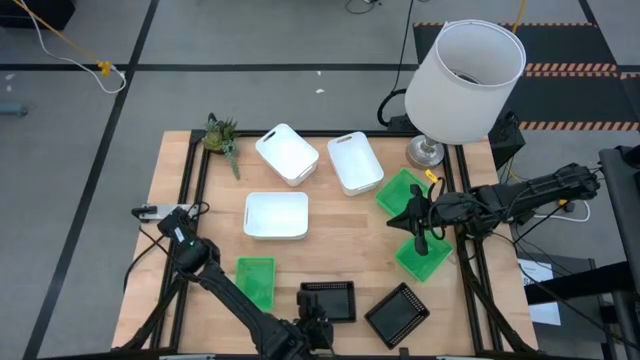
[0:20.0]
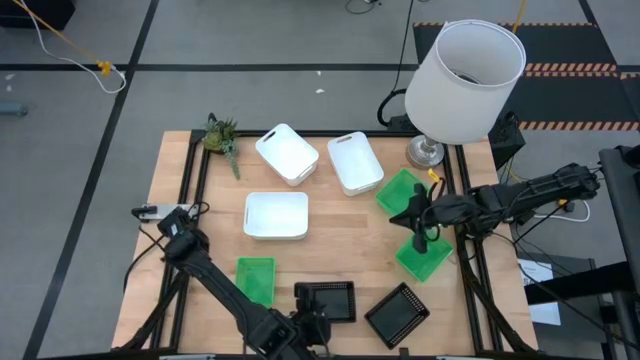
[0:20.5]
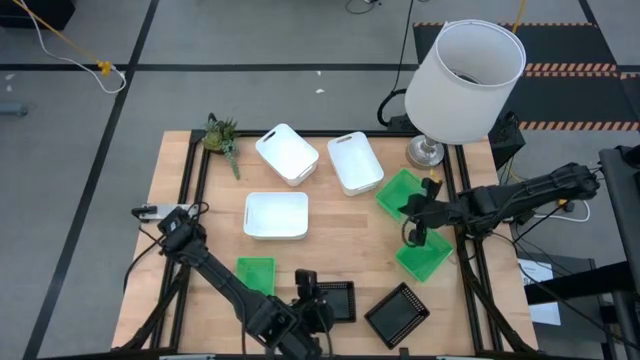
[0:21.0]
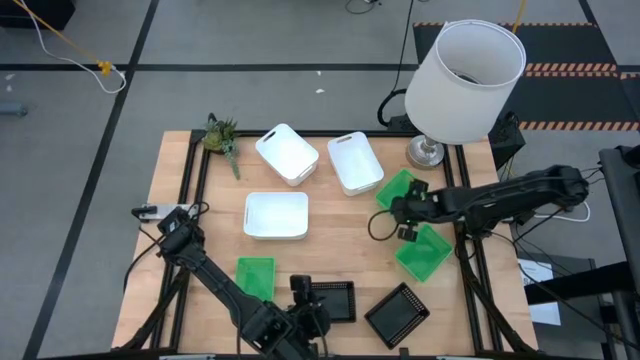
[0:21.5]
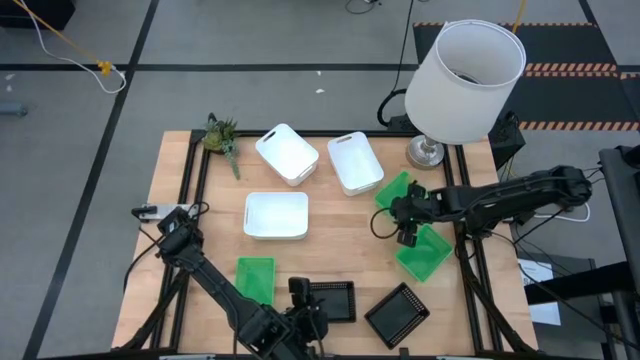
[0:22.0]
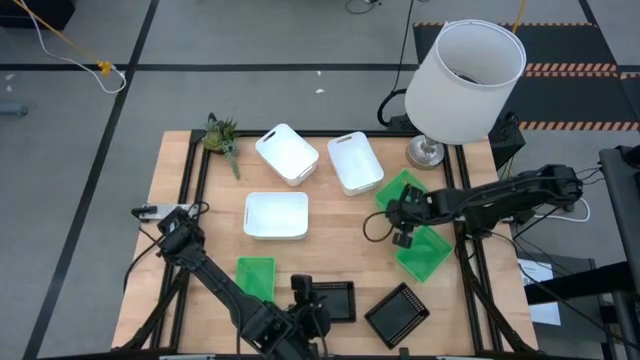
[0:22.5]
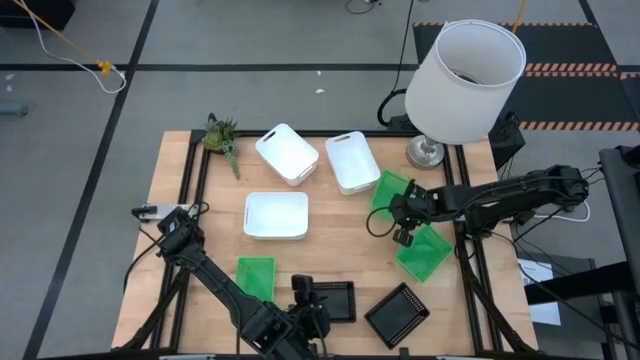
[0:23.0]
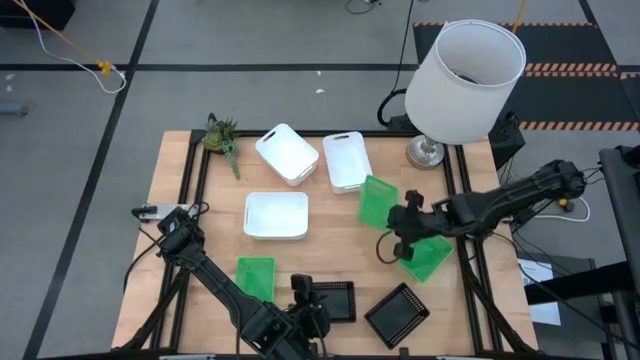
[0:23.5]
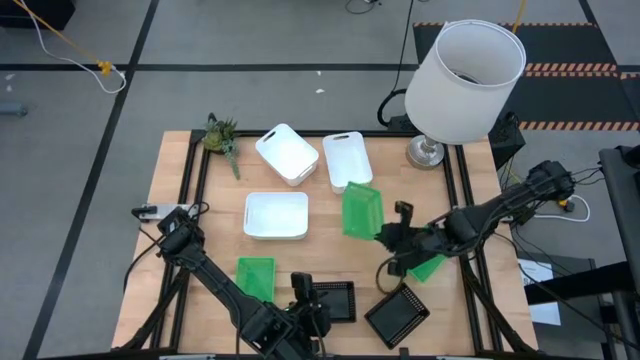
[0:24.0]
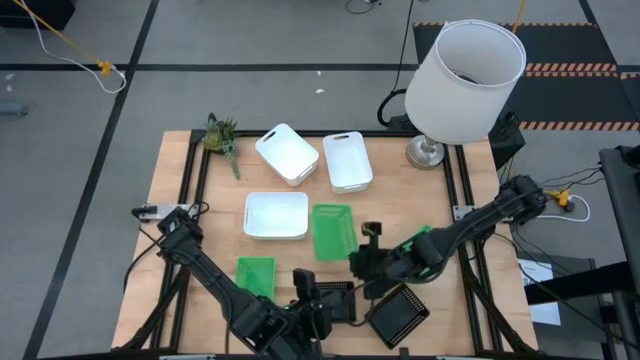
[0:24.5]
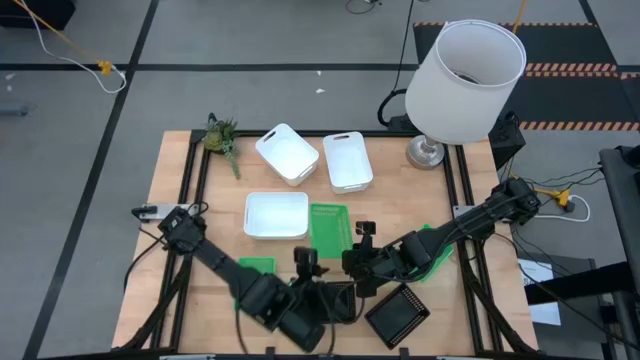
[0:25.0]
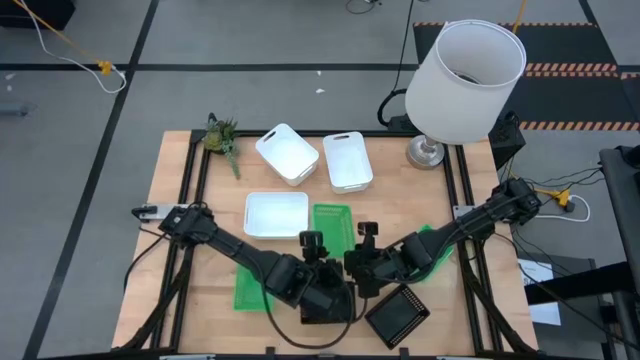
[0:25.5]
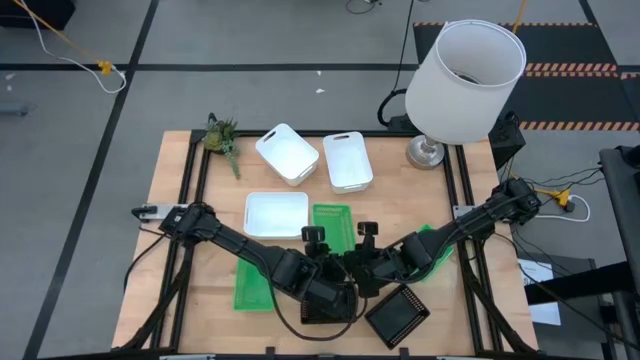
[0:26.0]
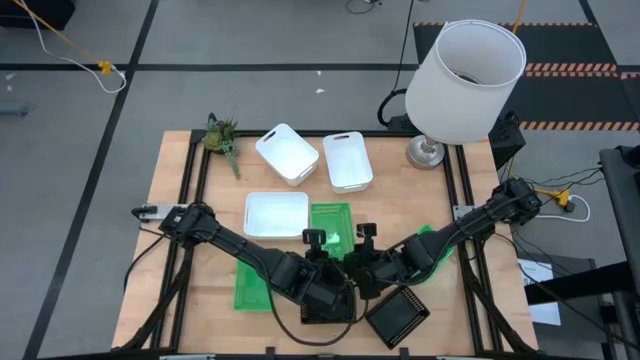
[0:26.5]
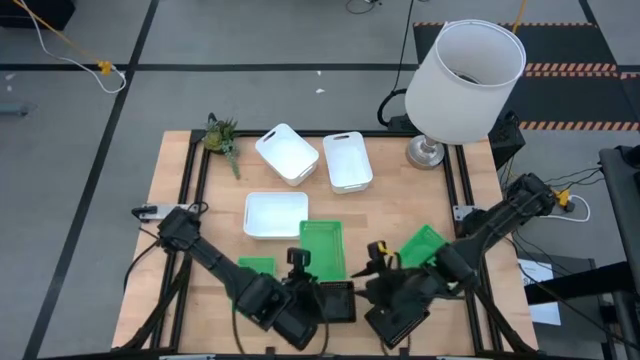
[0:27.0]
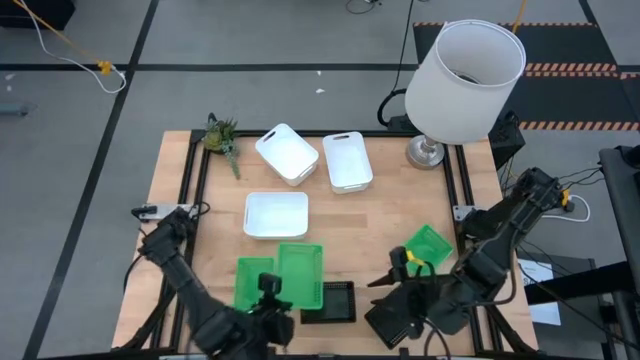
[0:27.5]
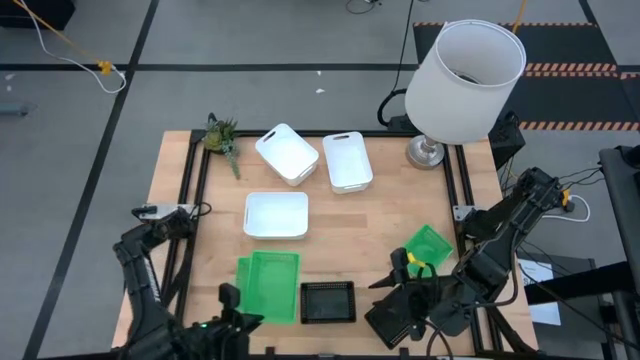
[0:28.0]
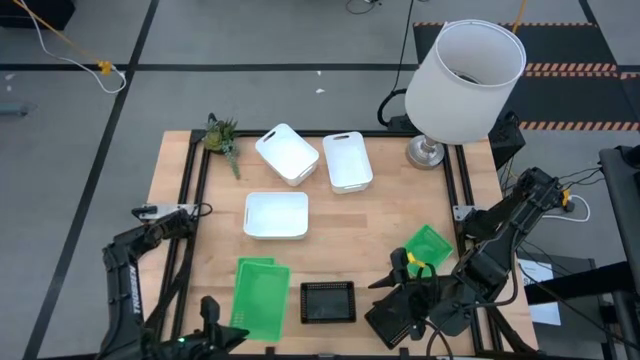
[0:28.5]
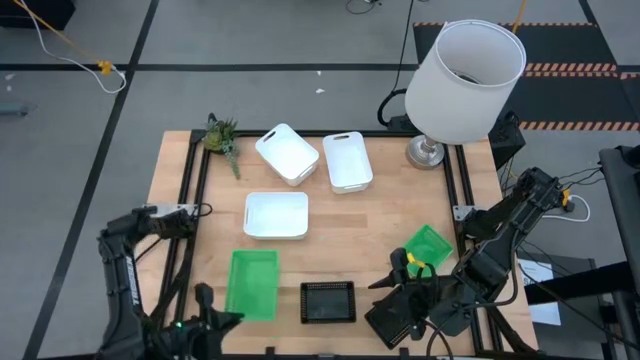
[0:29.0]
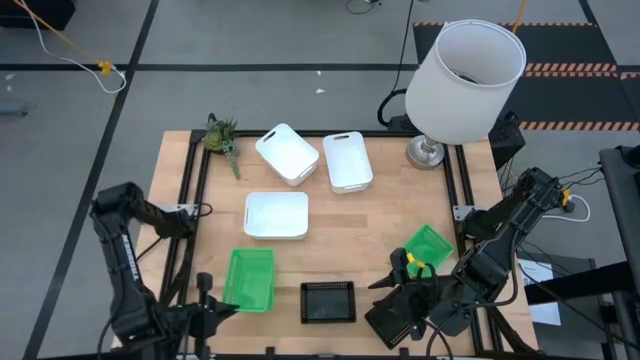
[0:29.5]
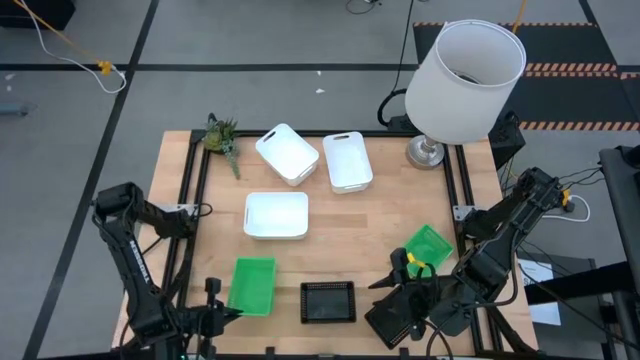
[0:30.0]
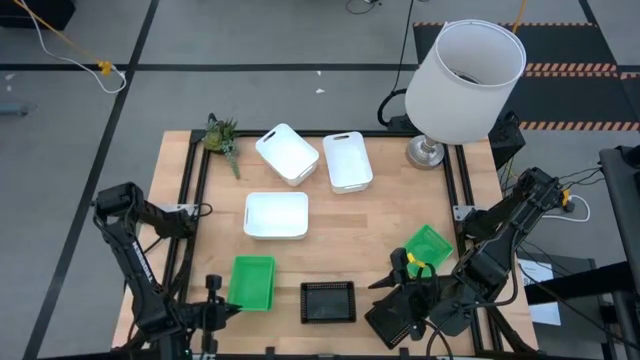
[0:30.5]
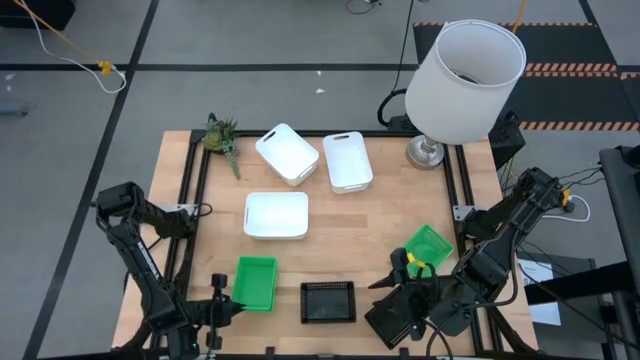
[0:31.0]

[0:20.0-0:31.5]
Stack the top green bin into the bottom left green bin

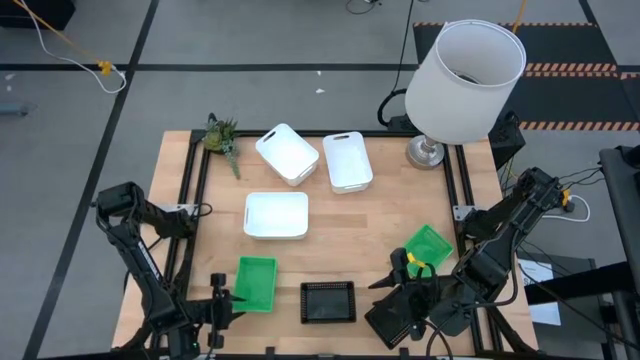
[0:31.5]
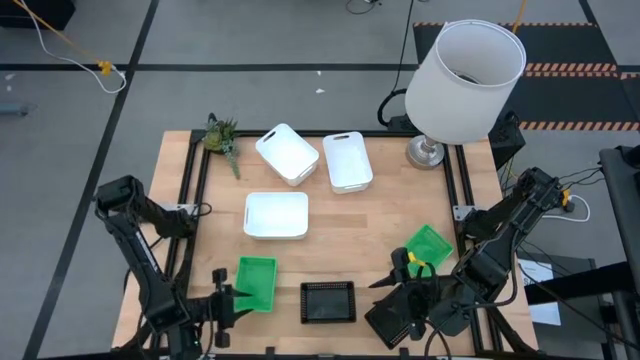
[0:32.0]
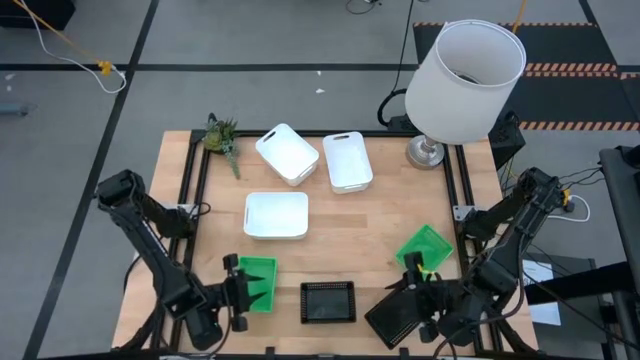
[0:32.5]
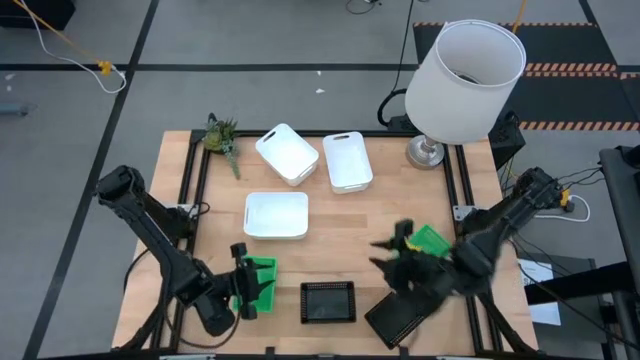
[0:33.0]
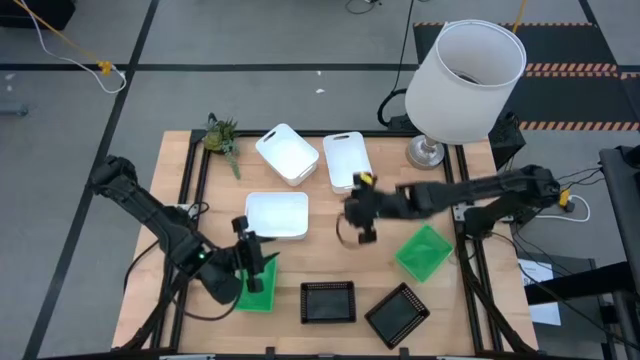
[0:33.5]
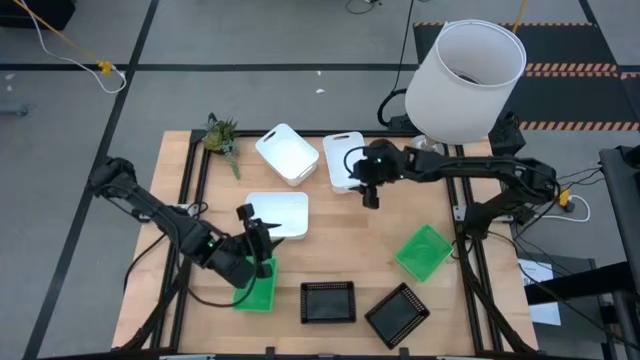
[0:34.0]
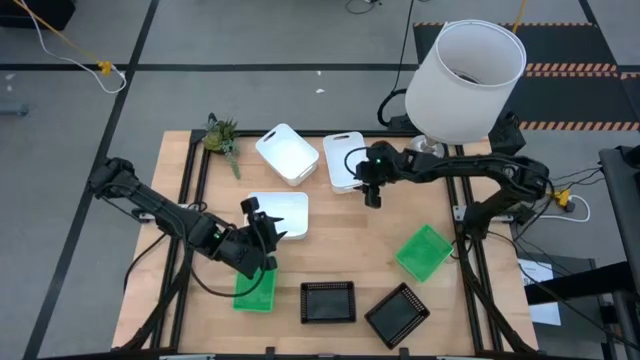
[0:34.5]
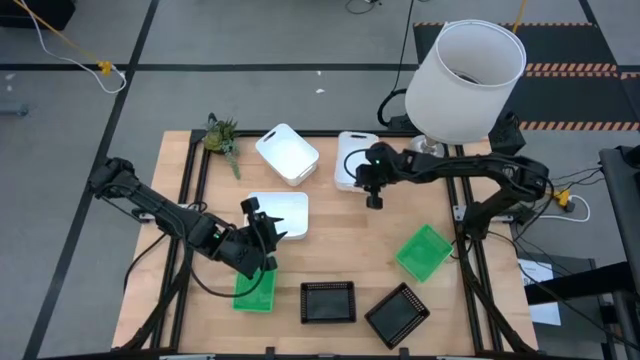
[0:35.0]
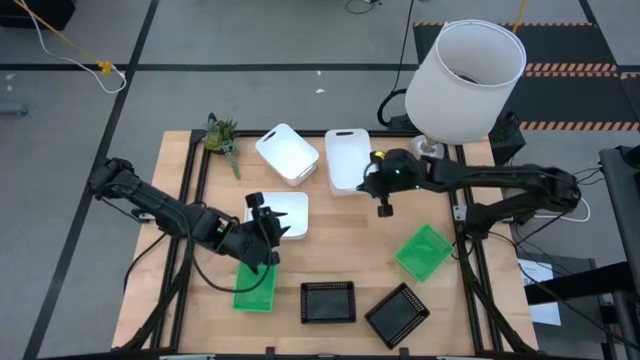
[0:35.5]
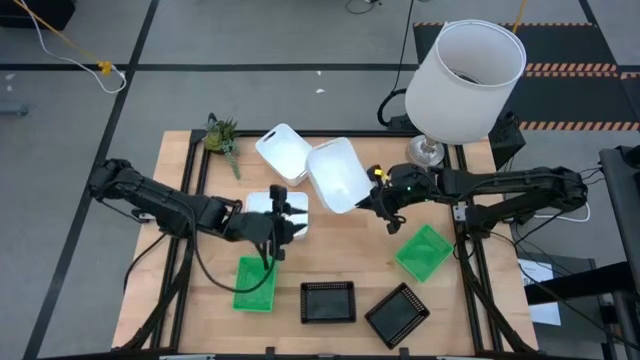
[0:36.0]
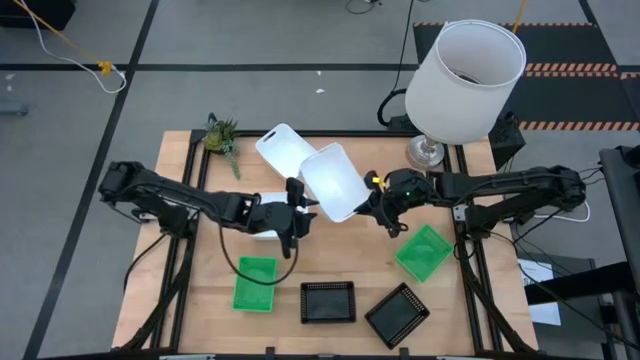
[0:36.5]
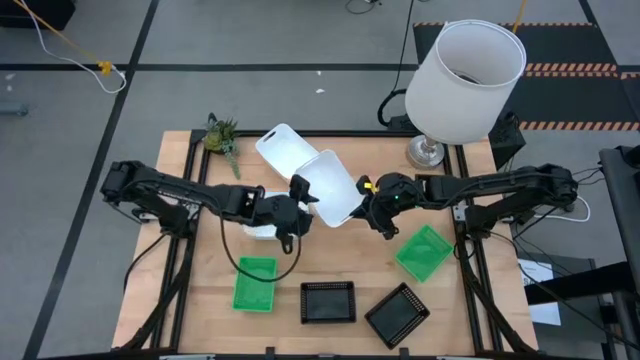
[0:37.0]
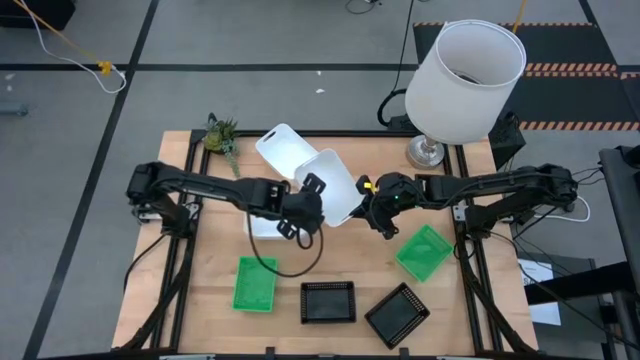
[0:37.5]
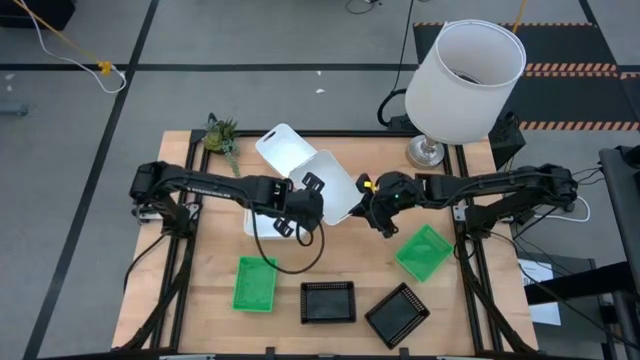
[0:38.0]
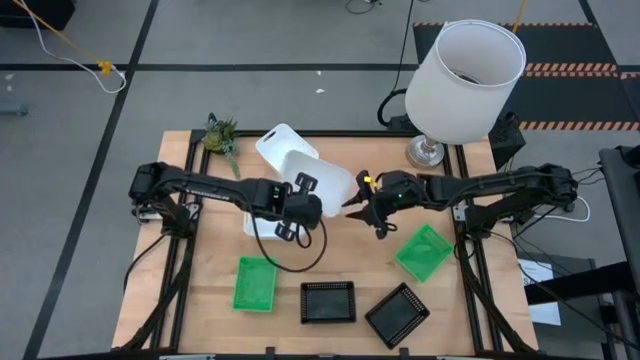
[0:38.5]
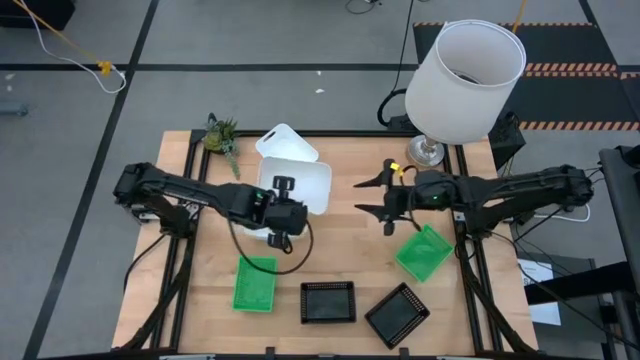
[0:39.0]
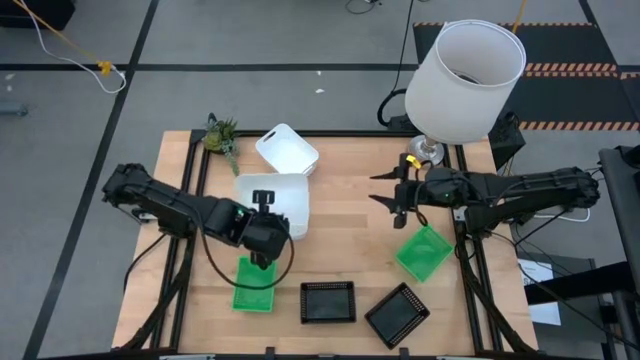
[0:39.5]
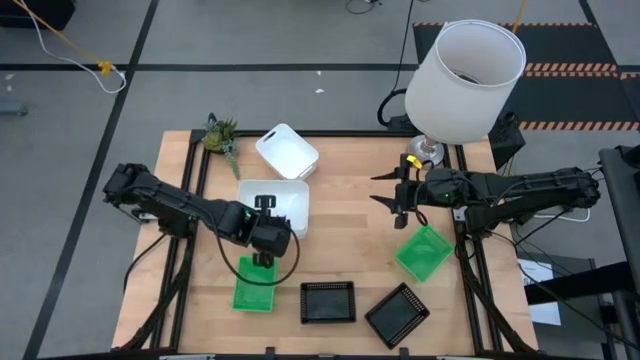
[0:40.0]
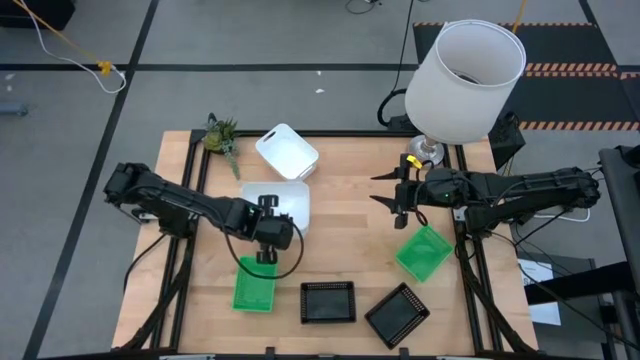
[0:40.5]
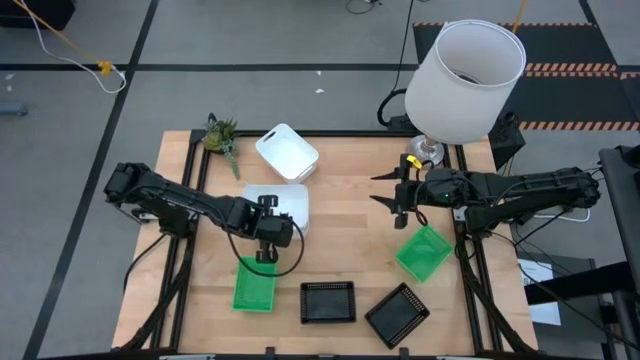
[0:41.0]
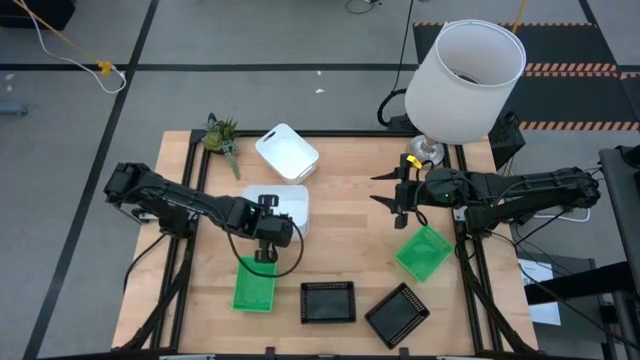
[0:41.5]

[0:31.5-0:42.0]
Stack the top right white bin into the bottom white bin
